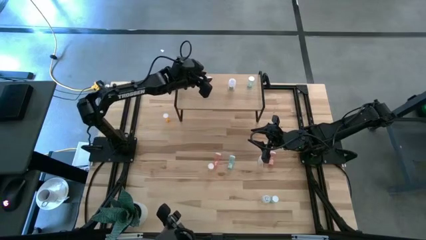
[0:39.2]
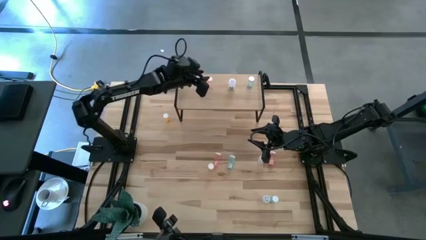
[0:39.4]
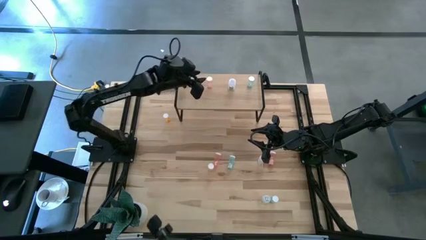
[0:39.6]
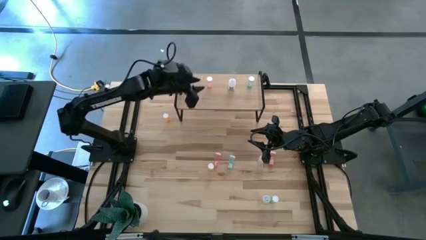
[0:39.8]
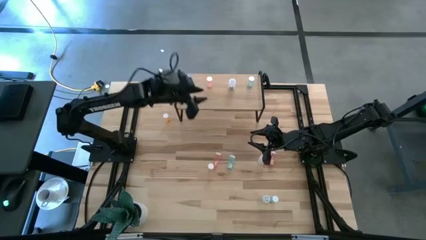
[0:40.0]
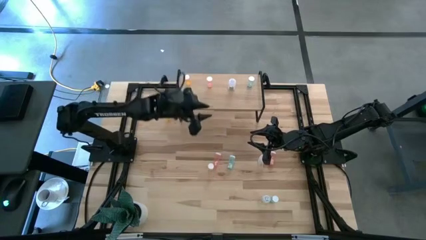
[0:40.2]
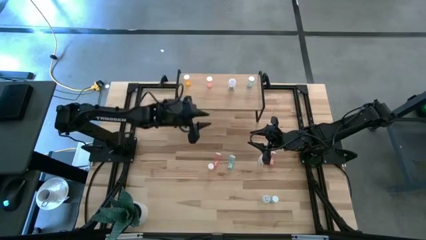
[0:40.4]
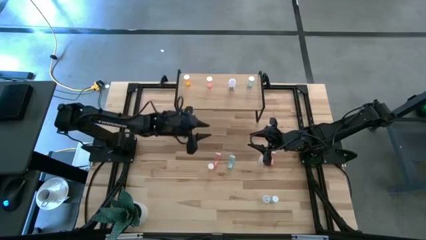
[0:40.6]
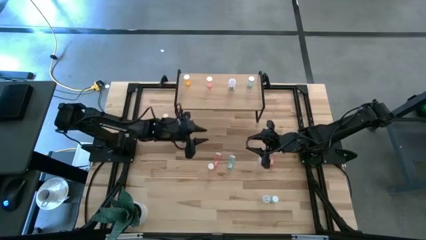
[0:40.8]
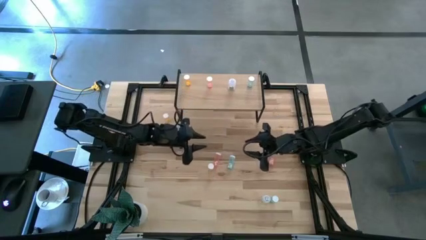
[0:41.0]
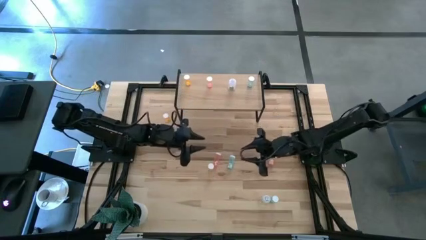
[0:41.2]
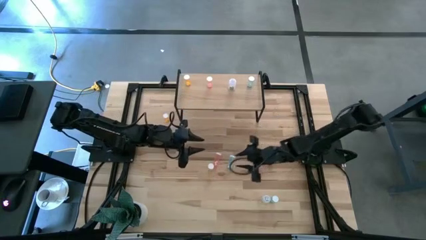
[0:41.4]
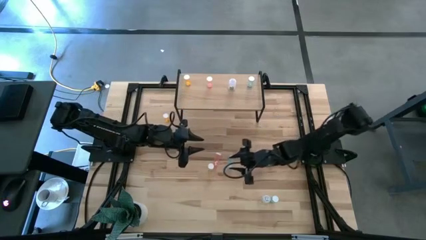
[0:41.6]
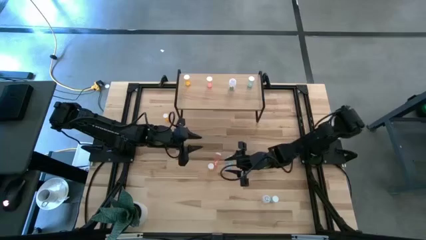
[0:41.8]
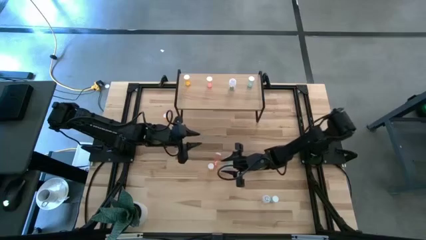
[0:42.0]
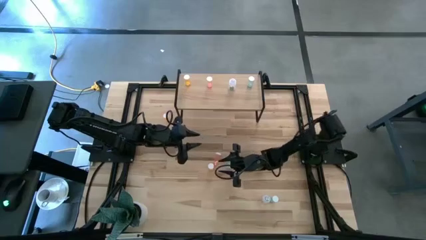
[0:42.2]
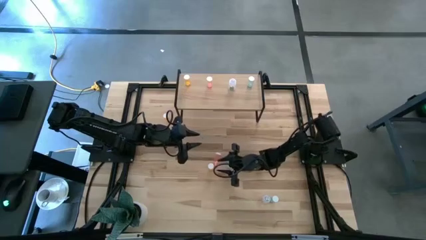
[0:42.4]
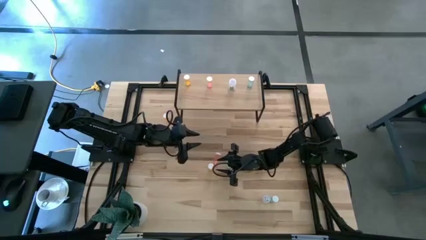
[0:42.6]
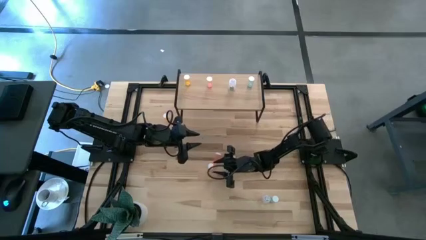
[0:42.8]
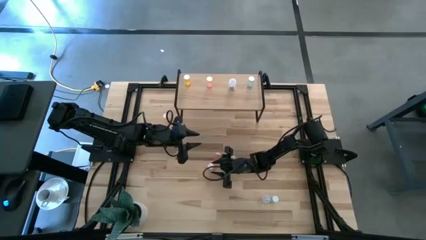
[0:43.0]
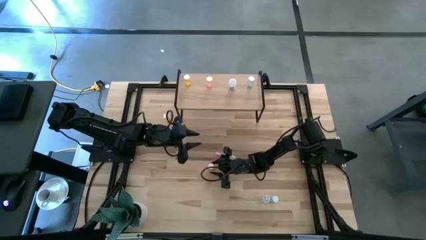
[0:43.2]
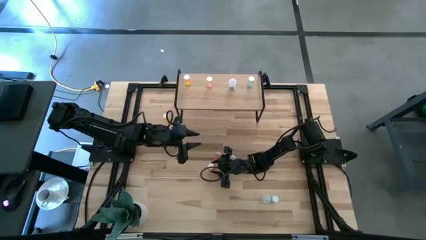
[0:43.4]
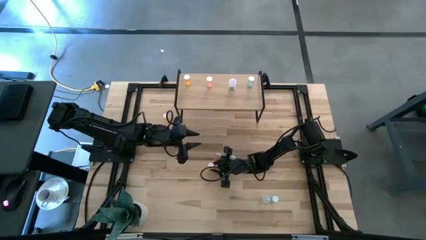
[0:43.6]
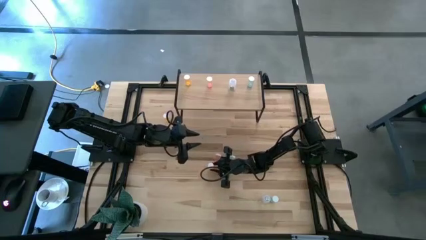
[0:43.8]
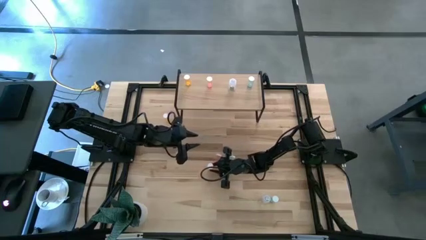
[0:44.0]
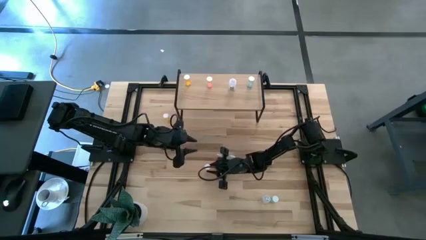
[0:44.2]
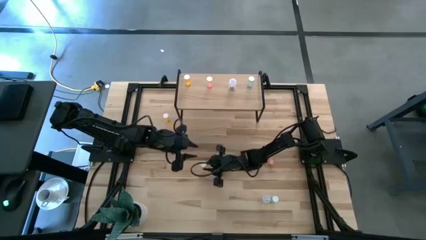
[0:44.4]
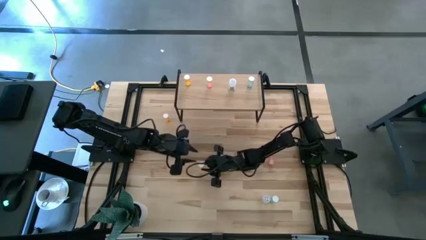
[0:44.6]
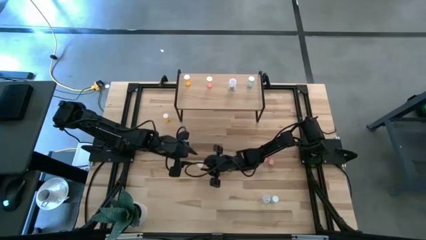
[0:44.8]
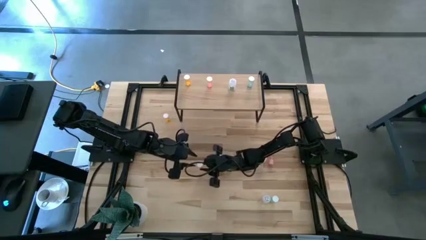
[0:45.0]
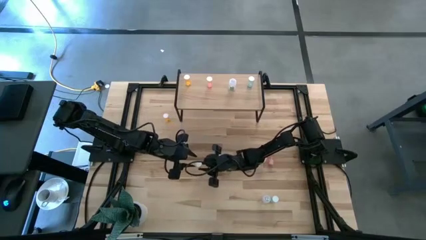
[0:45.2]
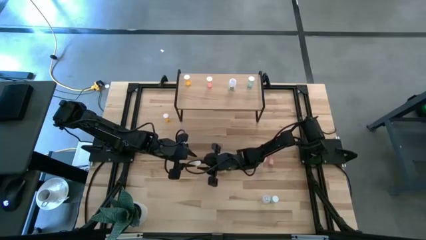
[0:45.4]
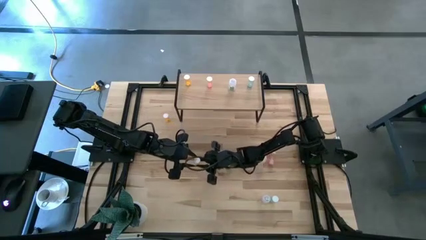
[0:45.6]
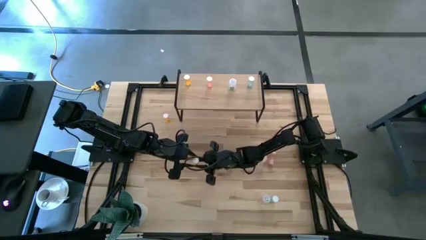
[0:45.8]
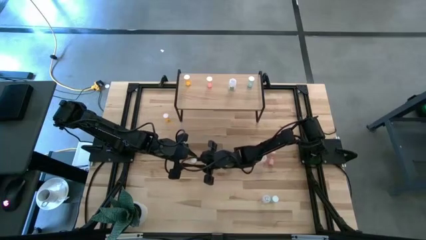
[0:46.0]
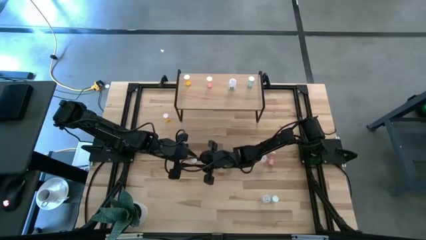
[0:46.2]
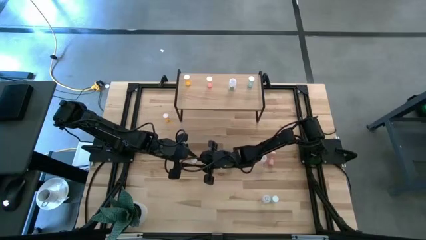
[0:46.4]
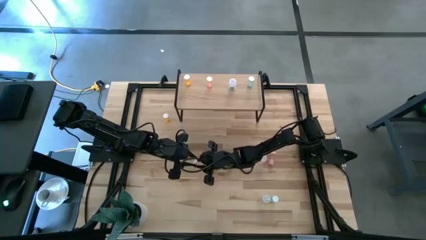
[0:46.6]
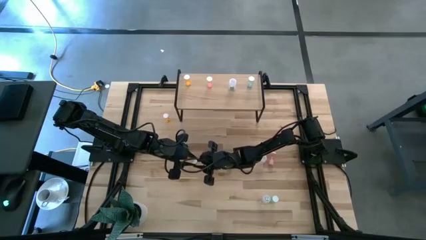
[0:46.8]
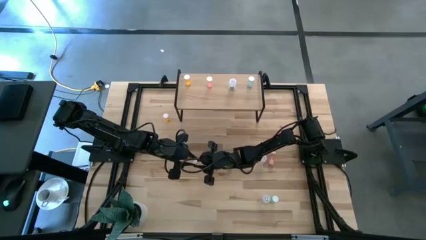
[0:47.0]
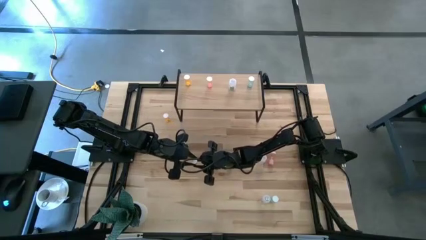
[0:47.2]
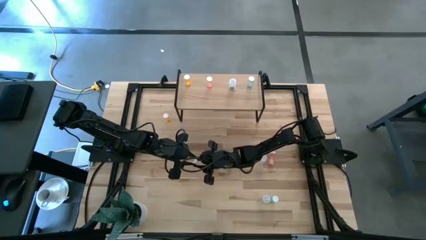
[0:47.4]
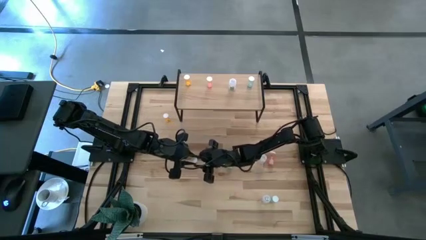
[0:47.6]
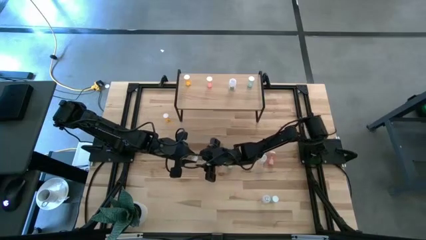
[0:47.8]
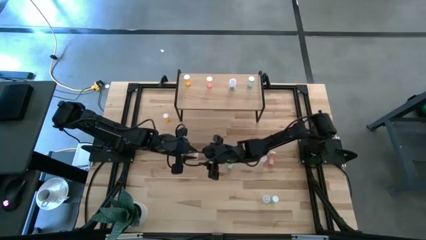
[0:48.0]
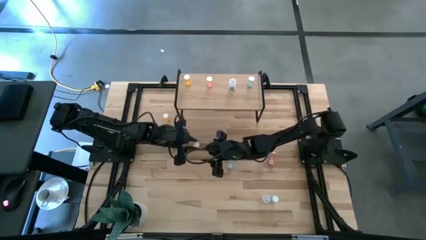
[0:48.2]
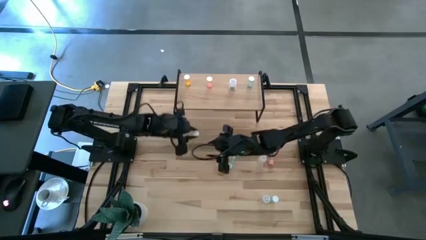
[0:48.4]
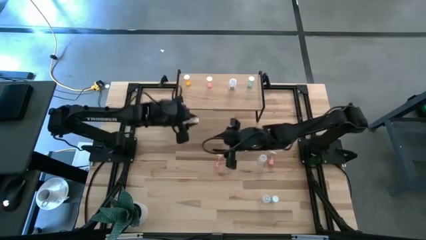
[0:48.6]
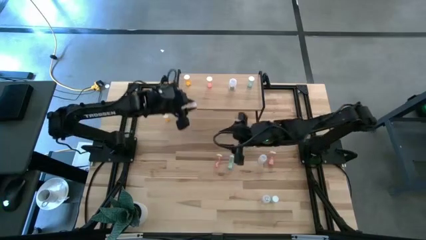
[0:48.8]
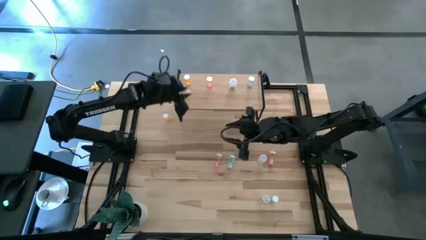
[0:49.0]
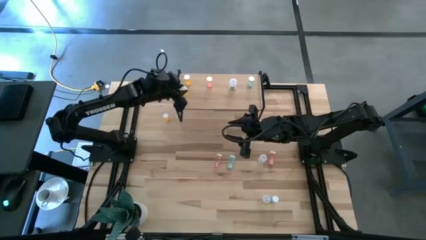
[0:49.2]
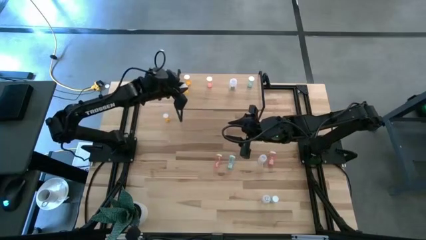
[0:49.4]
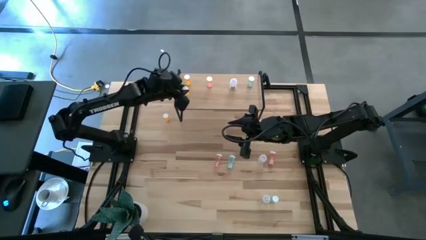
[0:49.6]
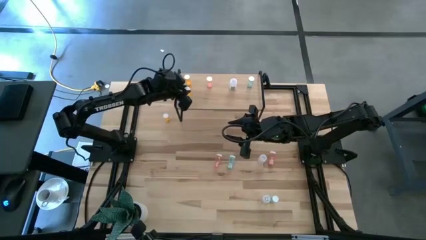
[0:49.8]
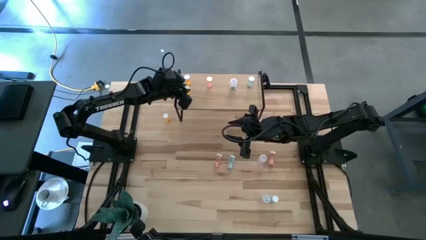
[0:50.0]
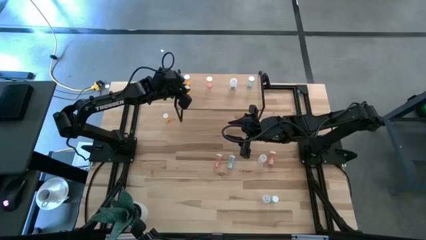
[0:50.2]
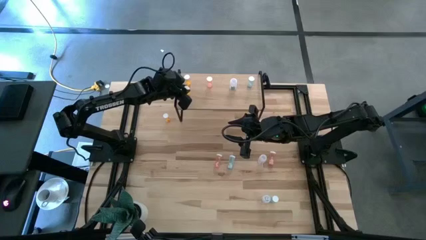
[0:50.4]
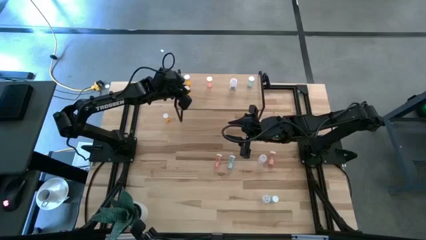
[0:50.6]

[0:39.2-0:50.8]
Task: Pick and place medicine bottles onto shelf by color
Align the bottom orange pill bottle with the other orange pill bottle on the shelf

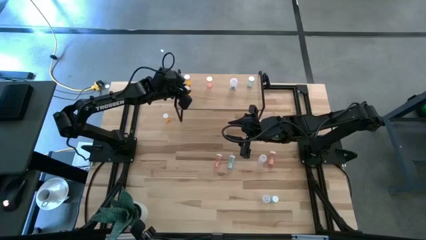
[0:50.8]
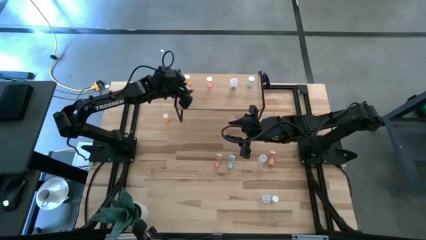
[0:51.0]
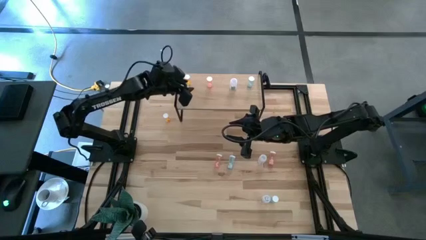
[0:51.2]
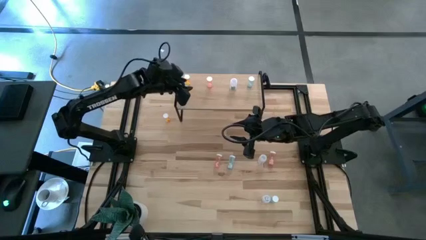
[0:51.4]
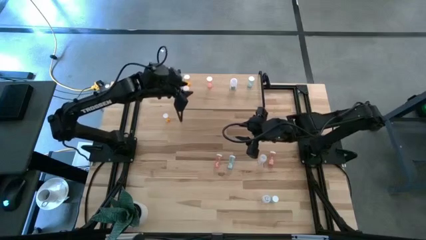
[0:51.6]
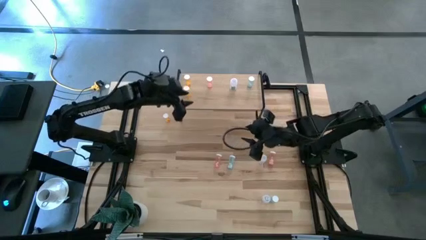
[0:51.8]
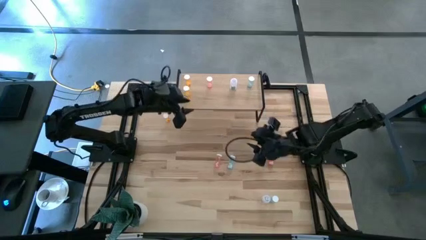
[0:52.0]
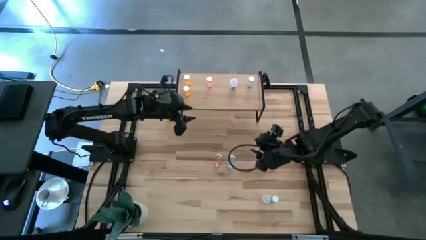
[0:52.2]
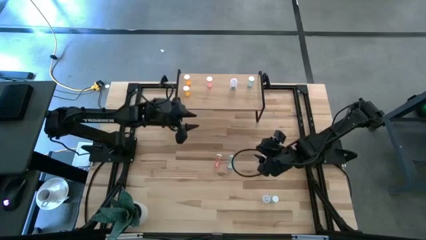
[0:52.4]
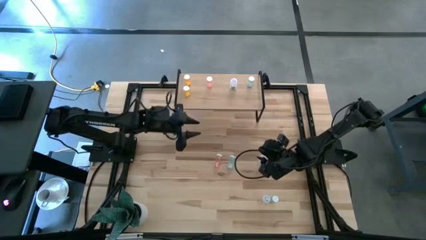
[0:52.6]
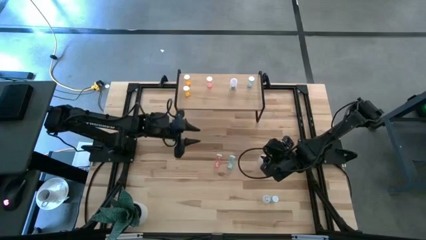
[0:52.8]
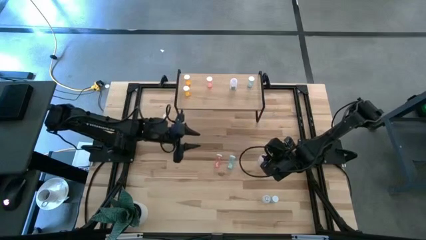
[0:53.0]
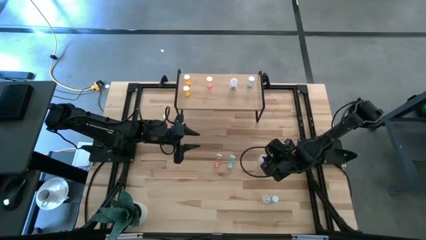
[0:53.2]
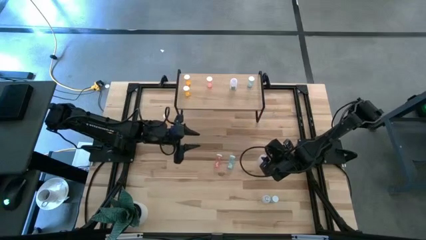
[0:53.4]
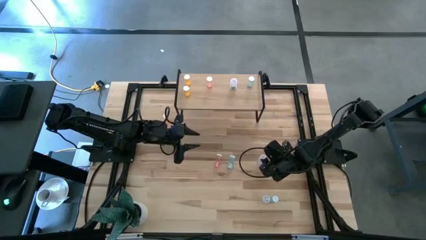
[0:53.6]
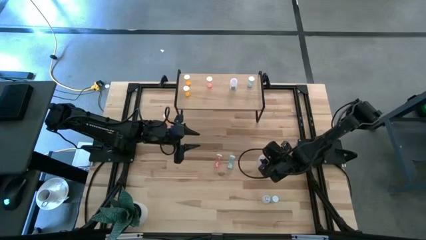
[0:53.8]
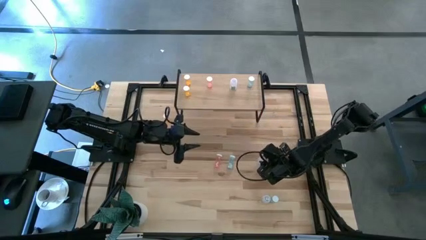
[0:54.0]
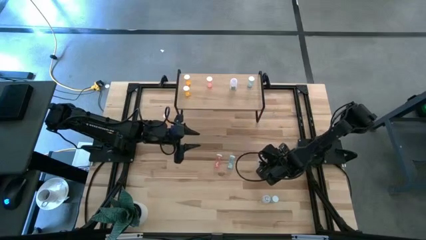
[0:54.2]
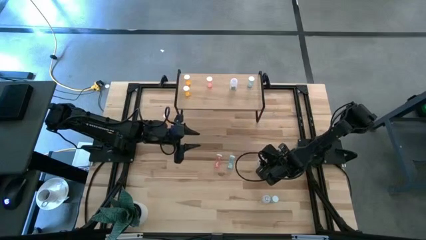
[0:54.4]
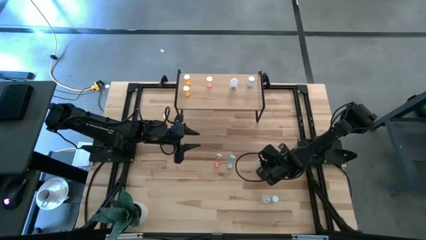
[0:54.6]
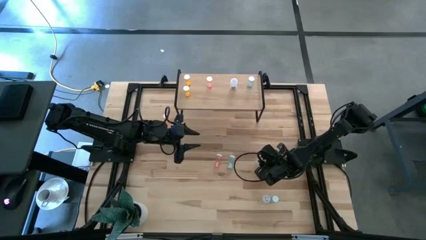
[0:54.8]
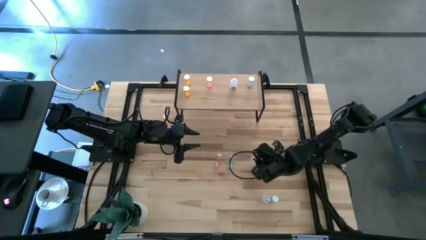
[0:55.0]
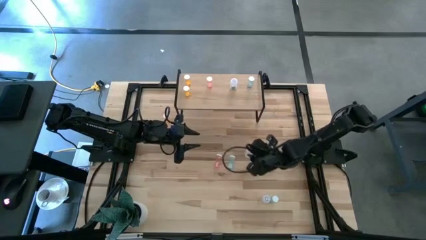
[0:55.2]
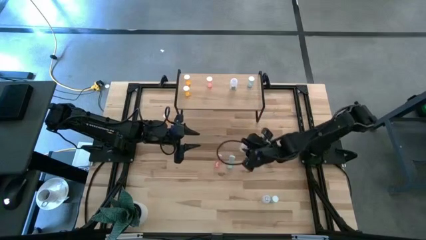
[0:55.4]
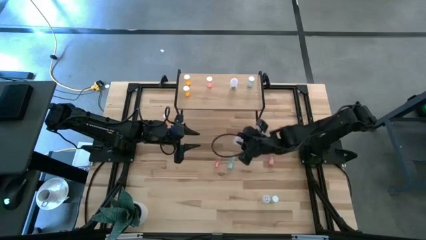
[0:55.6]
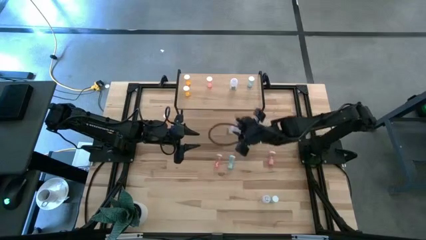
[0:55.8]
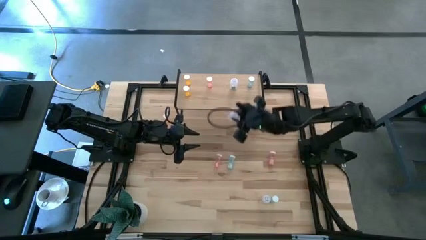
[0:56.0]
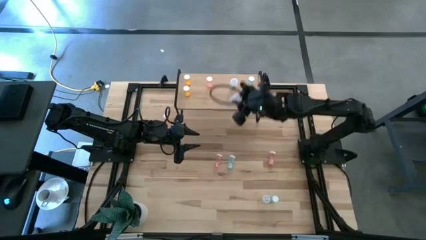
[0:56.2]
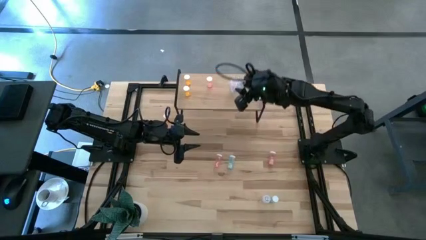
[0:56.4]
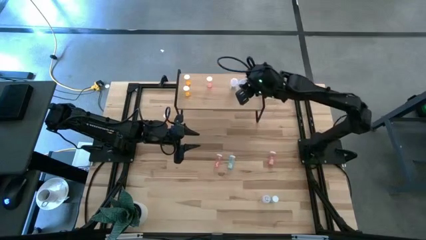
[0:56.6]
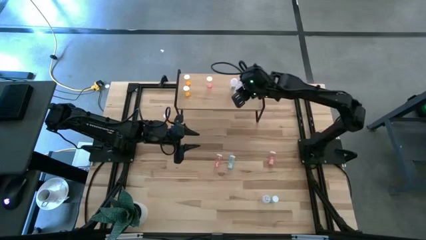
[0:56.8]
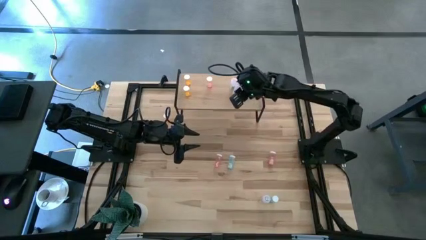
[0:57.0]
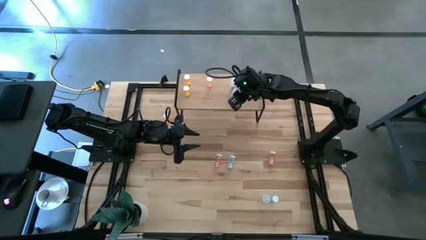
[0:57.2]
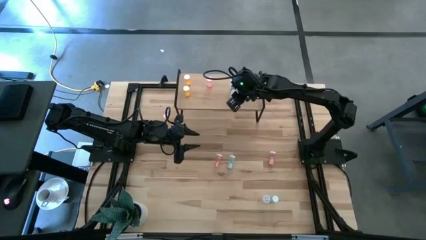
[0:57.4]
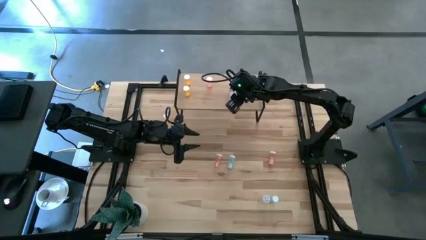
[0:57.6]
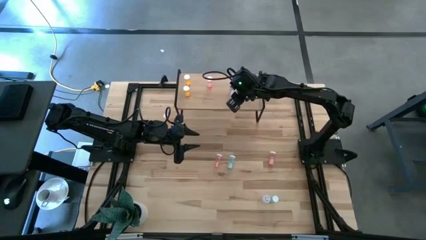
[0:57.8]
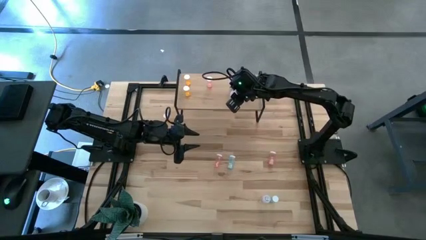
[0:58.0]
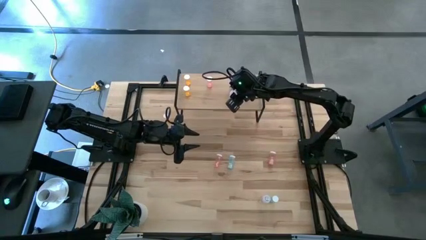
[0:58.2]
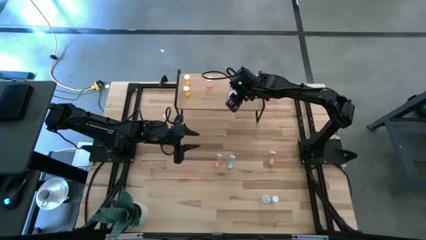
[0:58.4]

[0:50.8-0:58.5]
Align the top white pill bottle with the other white pill bottle on the shelf
